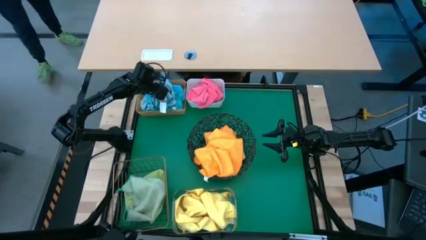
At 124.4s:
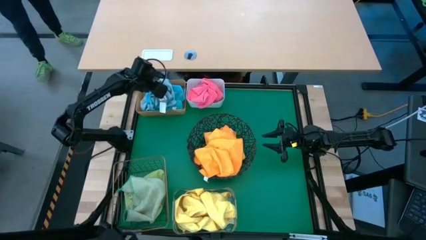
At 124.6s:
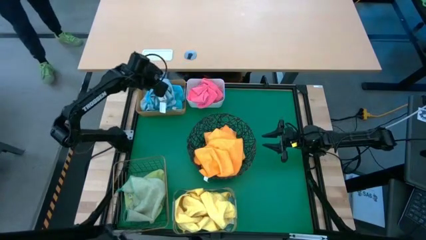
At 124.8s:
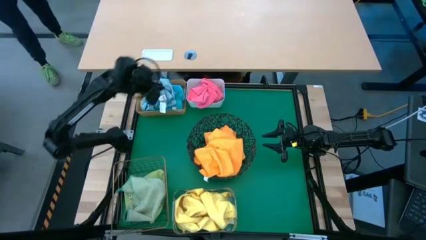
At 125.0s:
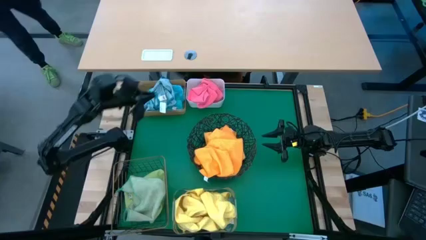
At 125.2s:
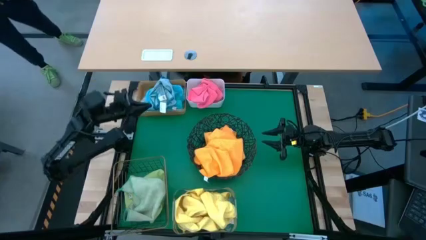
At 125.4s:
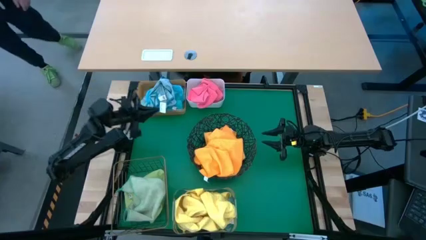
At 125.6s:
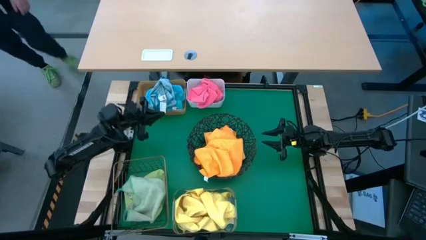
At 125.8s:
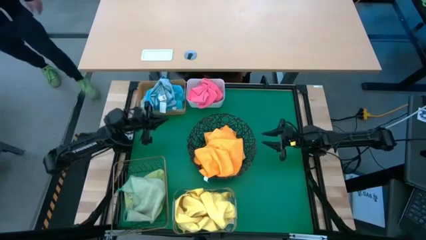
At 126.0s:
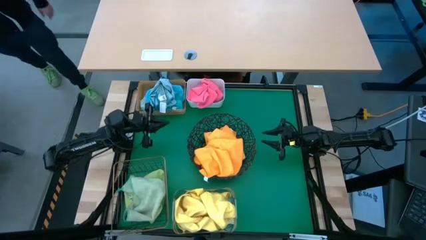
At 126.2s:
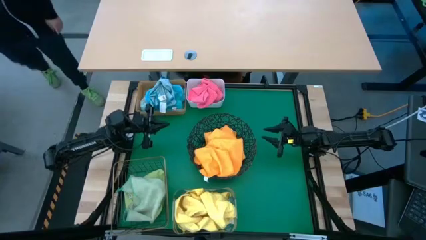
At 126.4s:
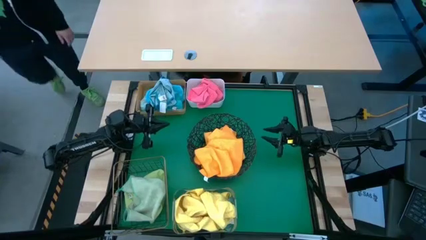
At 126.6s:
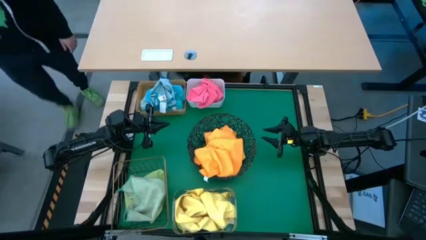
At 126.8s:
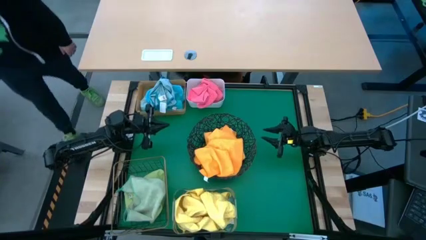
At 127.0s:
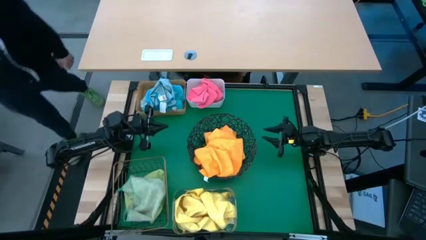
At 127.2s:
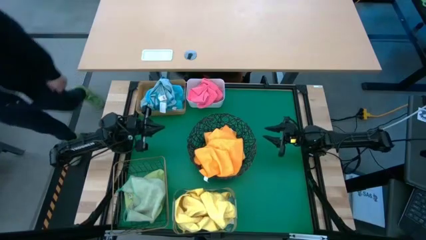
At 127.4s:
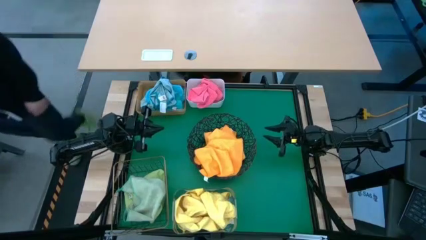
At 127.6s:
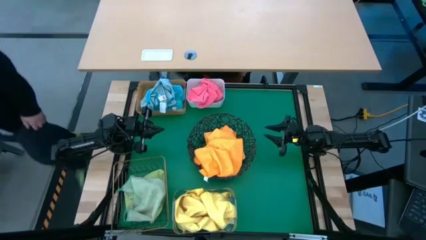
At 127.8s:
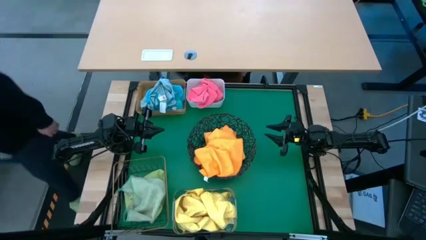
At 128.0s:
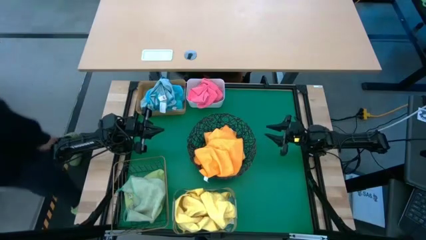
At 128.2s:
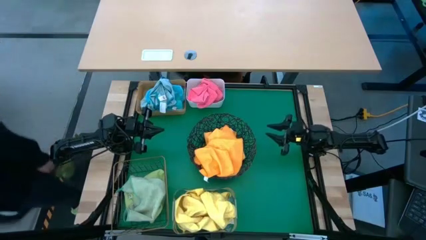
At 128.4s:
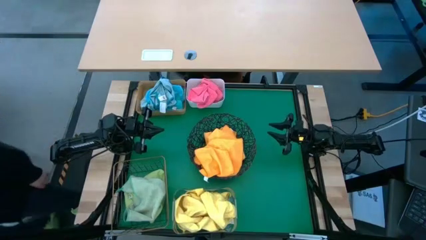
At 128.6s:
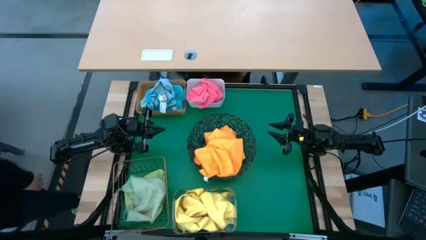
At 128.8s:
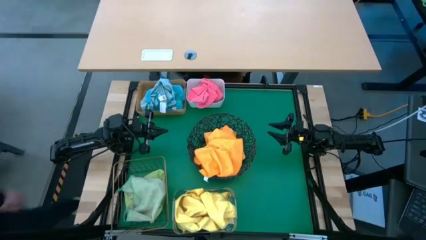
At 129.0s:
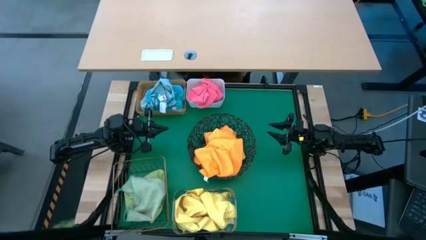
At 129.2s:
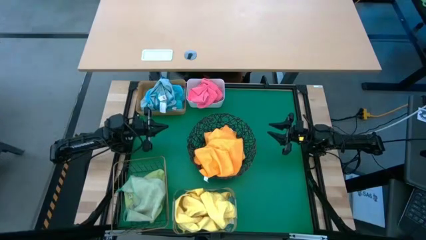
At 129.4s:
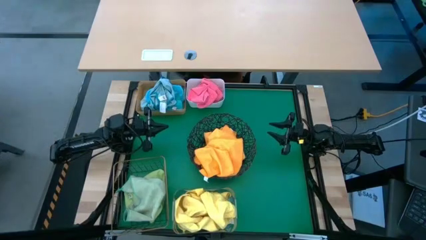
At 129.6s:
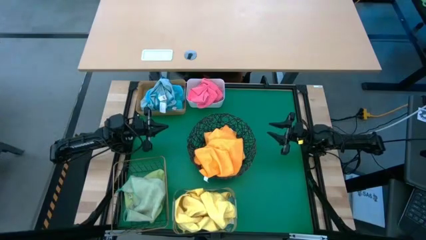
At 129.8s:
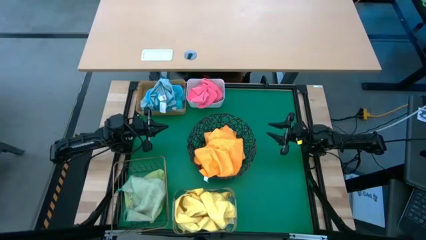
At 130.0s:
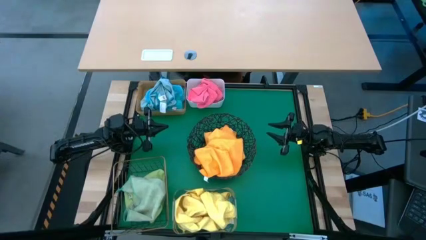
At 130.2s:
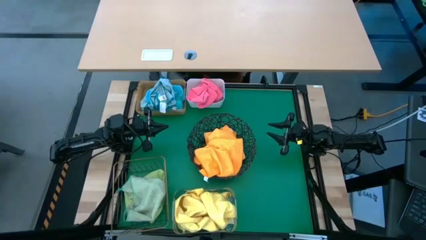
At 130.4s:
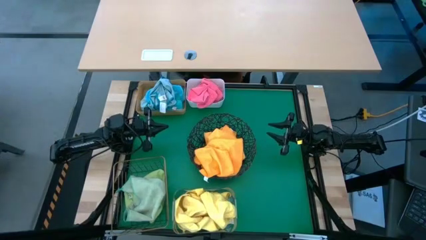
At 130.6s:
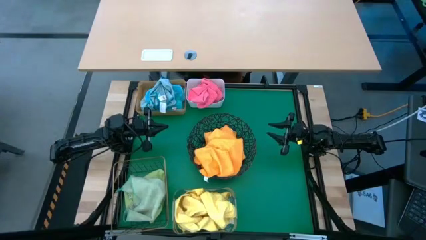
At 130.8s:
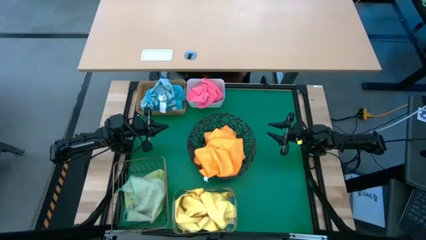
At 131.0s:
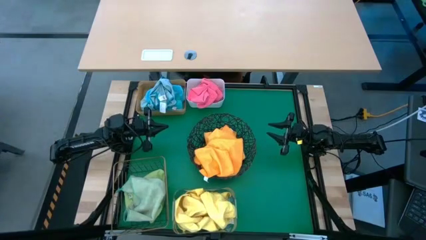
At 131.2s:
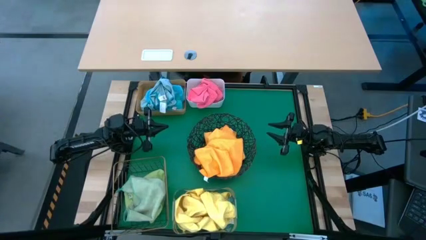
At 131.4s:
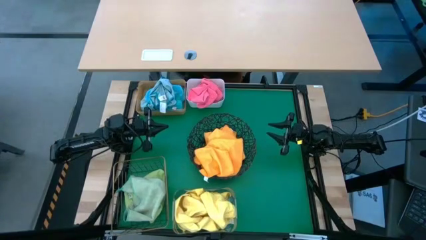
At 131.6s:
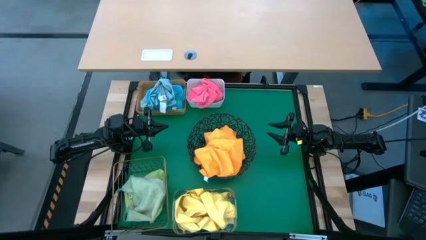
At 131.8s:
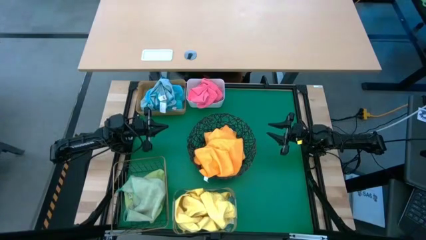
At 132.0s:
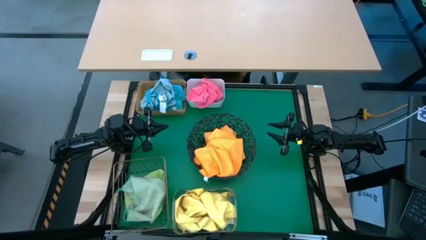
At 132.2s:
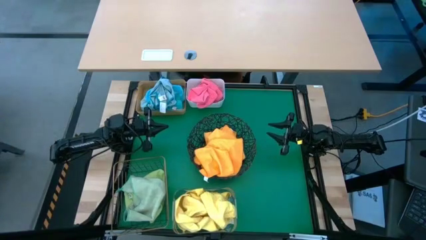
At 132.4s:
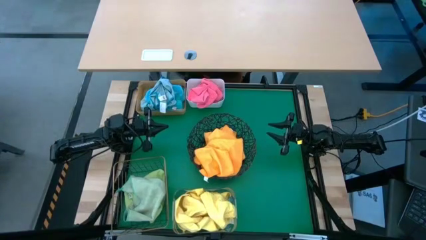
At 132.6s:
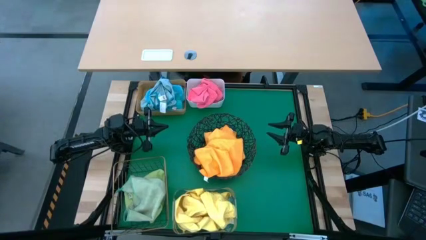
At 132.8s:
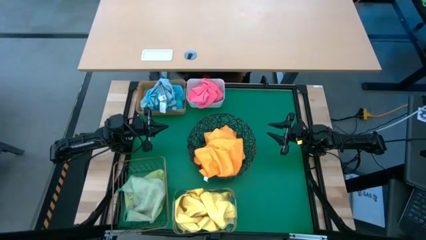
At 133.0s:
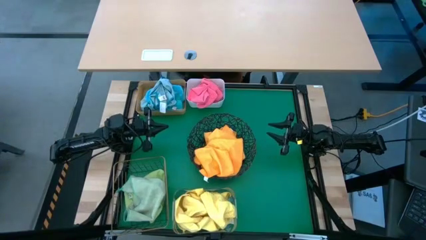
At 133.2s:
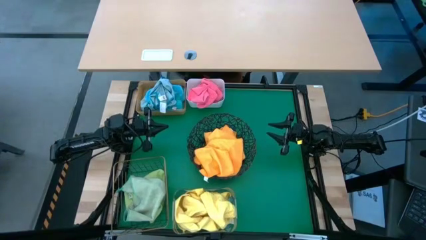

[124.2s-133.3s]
Task: Sort microfiber towel by color & place in baskets
Return to Home Position

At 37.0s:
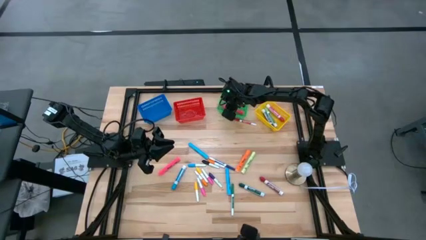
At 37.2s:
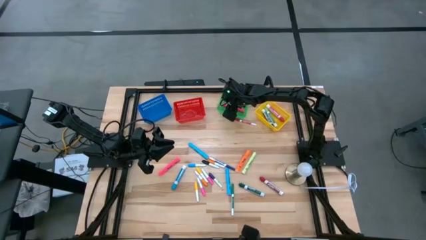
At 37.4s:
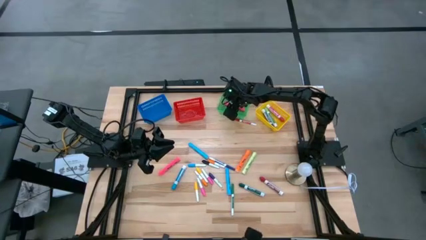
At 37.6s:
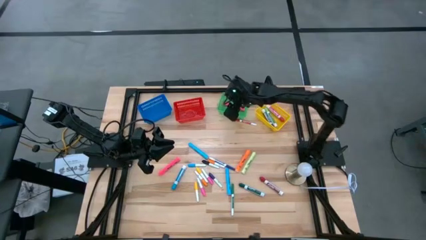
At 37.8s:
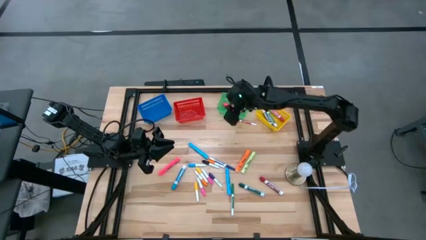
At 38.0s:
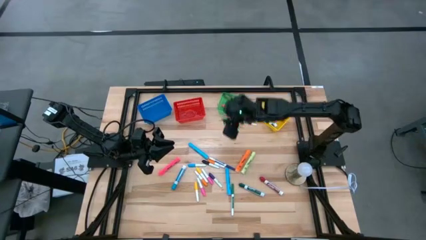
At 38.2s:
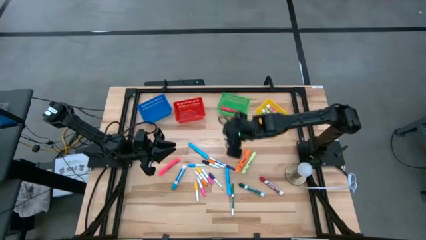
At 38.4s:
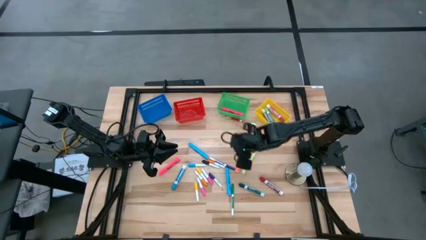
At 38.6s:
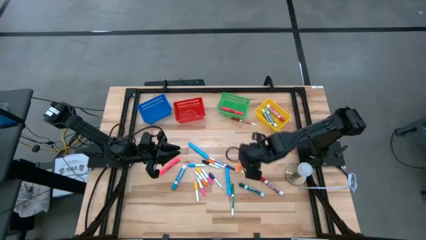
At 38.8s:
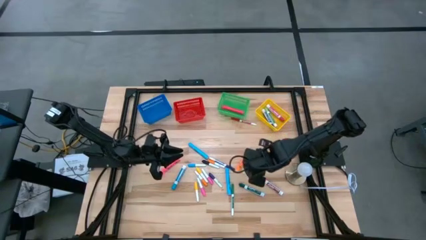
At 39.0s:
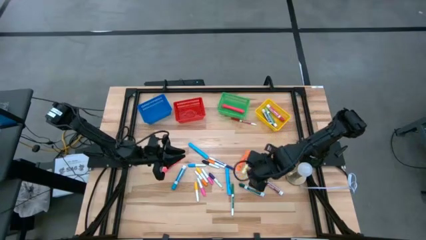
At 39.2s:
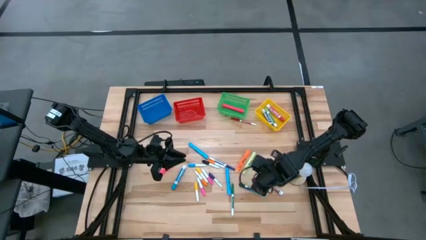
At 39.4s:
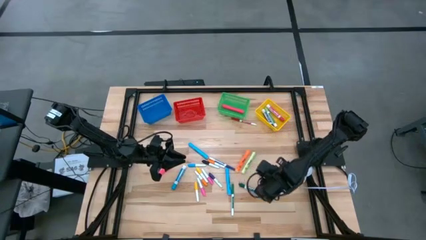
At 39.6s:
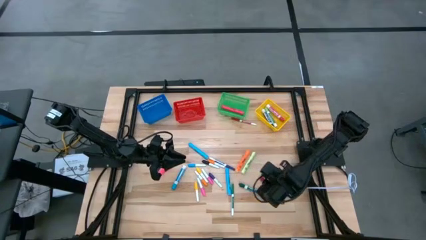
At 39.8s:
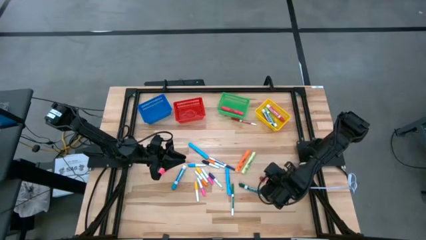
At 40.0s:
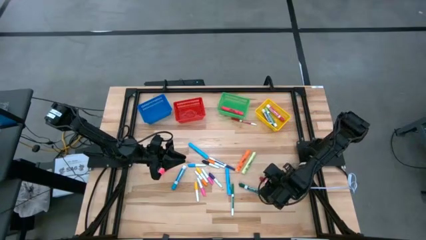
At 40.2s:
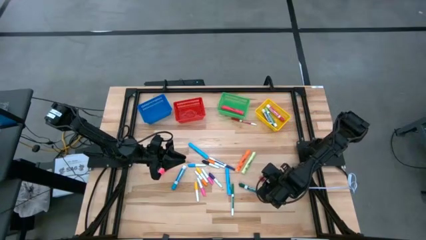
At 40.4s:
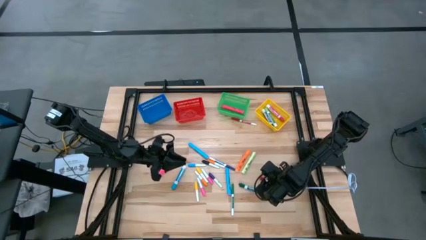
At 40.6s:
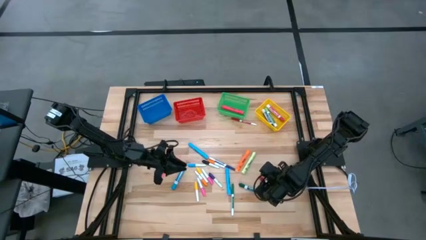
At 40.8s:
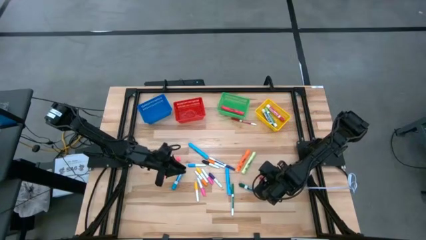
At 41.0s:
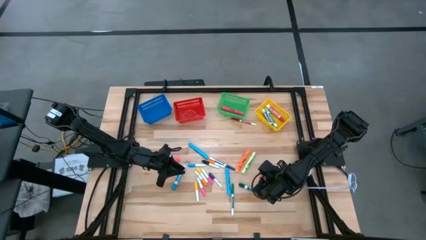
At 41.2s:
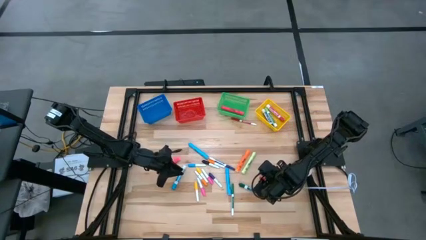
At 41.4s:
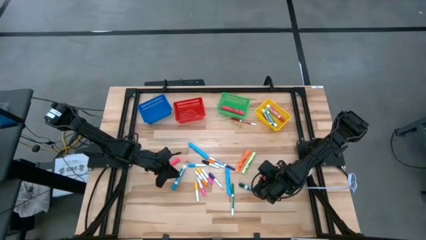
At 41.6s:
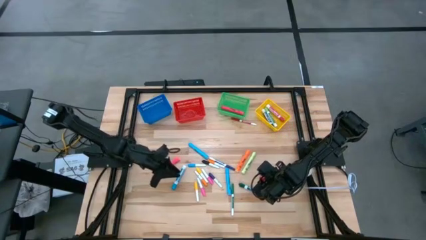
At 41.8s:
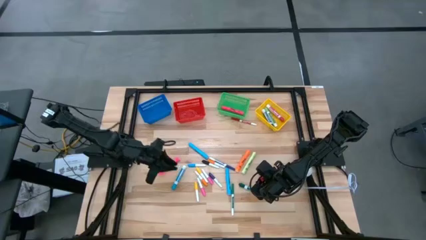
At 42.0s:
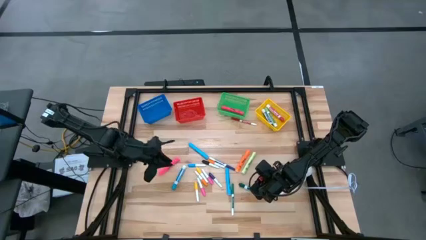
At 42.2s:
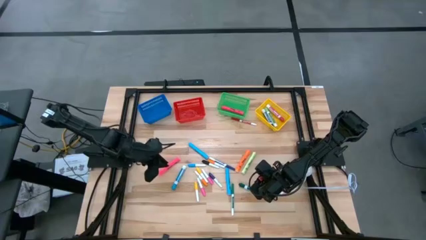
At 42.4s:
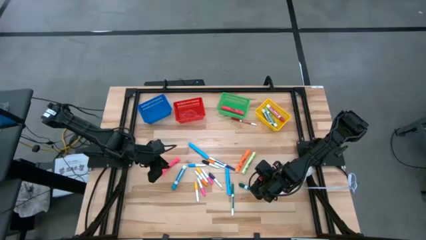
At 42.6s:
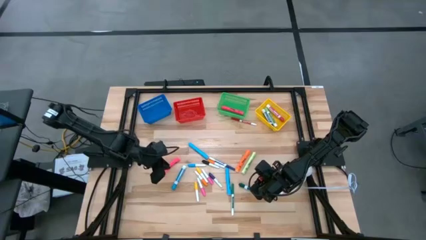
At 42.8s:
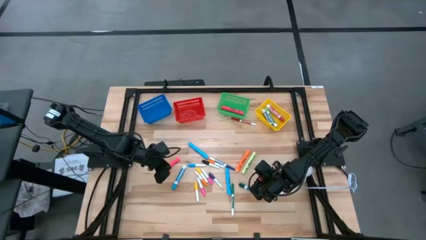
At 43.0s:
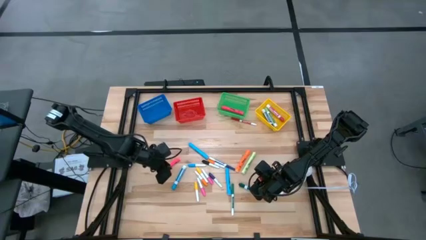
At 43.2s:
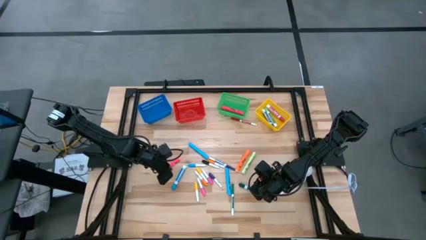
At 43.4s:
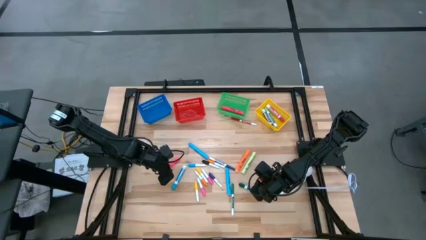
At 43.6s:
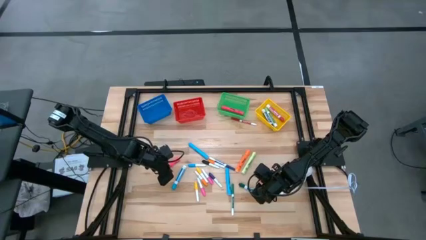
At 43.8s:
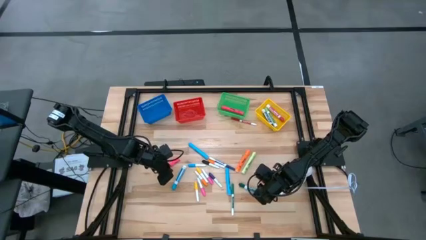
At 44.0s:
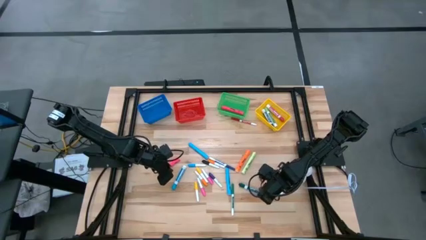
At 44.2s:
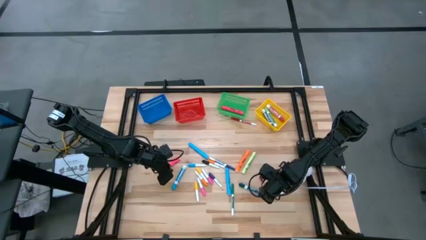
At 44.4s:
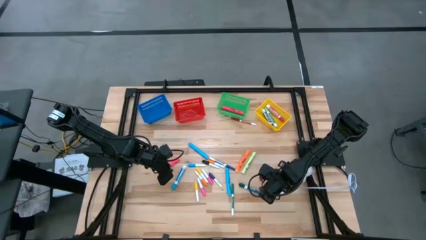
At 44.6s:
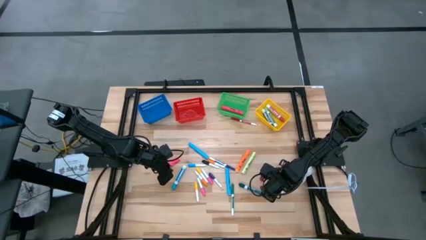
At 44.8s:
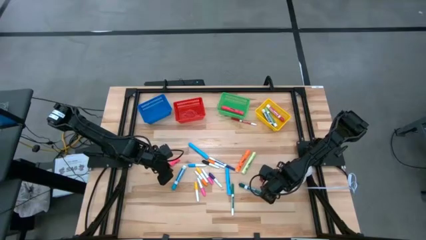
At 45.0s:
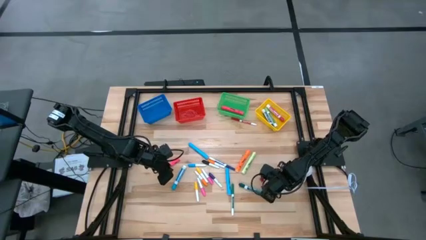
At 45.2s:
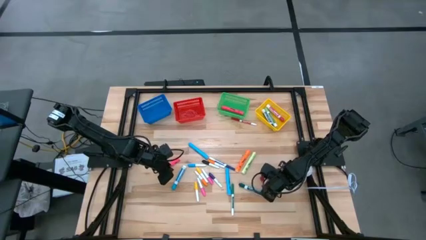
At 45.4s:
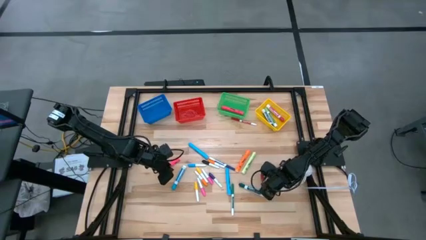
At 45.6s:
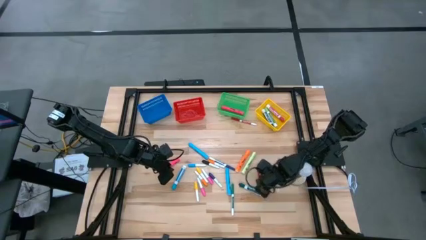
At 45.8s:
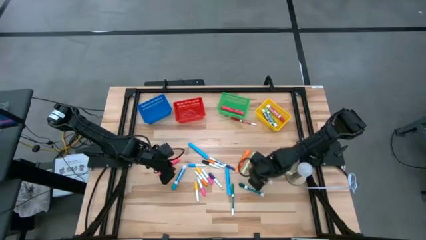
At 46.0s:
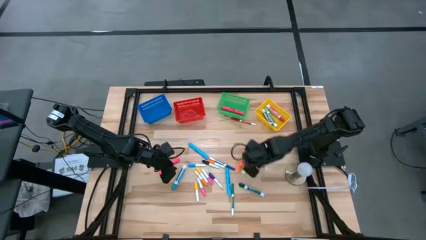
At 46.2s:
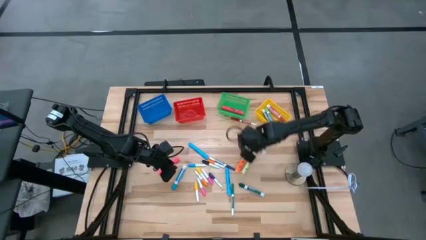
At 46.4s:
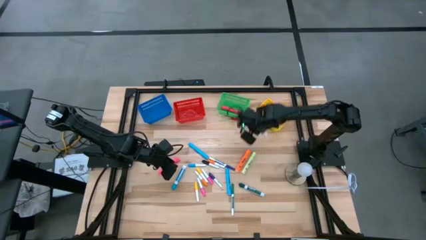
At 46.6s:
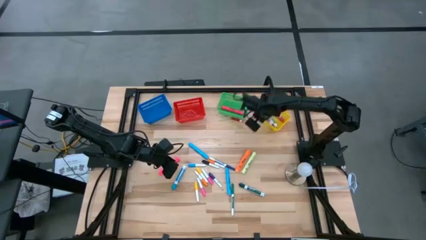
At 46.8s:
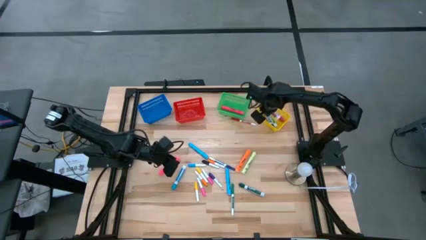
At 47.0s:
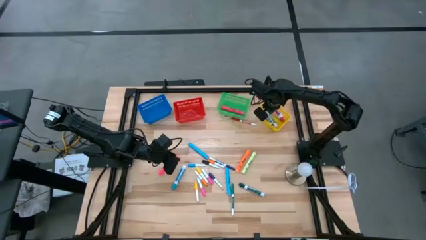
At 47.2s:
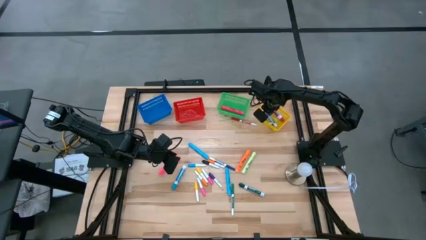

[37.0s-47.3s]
Task: Pick & Place Markers
Put the large red marker pen into the yellow bin
